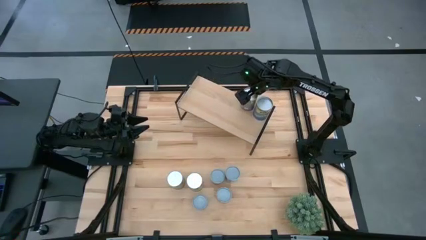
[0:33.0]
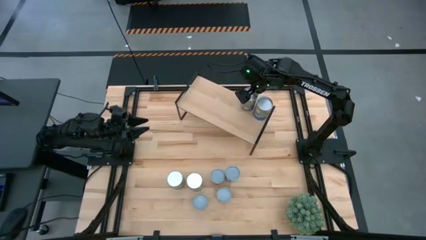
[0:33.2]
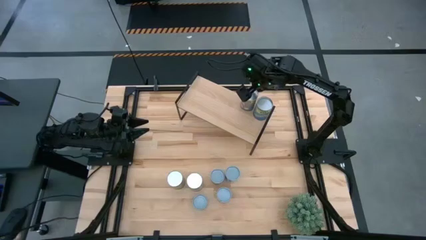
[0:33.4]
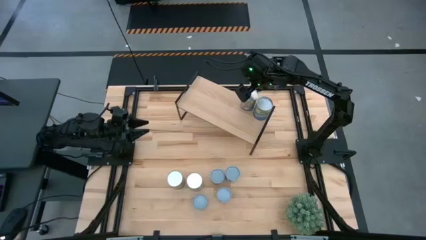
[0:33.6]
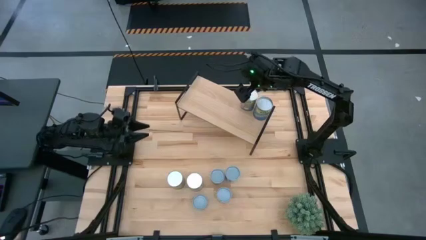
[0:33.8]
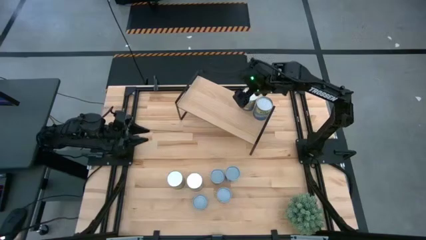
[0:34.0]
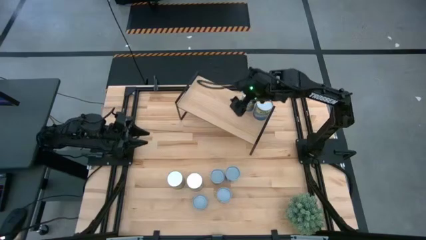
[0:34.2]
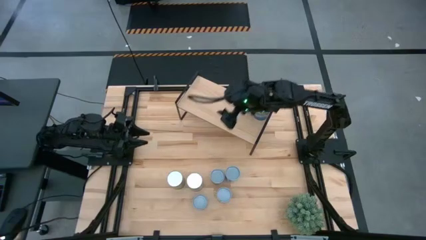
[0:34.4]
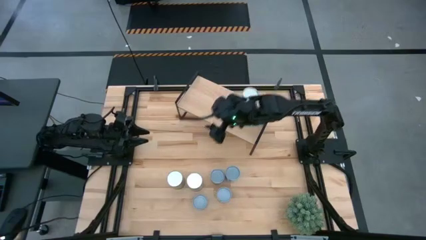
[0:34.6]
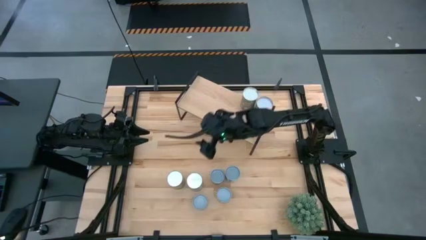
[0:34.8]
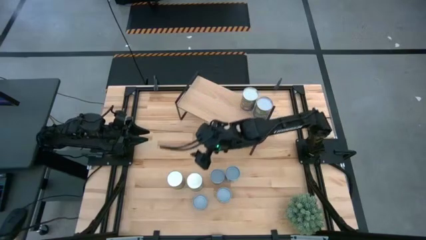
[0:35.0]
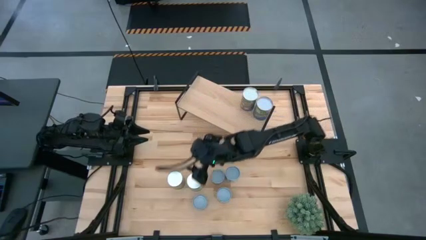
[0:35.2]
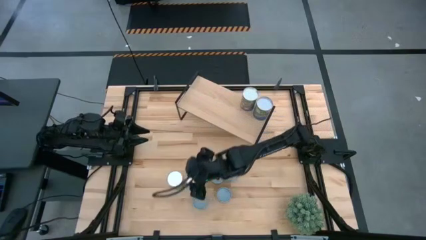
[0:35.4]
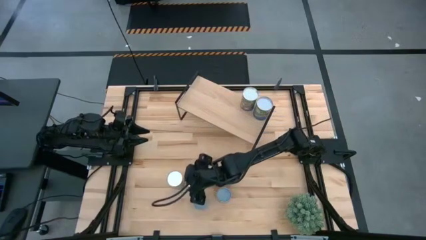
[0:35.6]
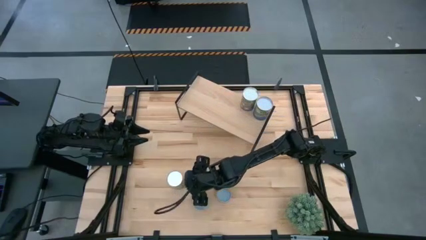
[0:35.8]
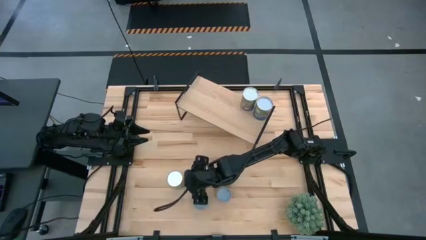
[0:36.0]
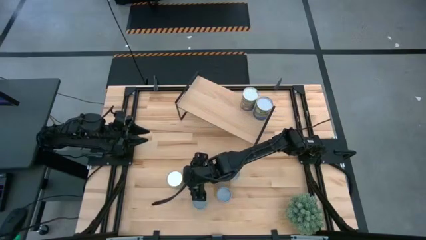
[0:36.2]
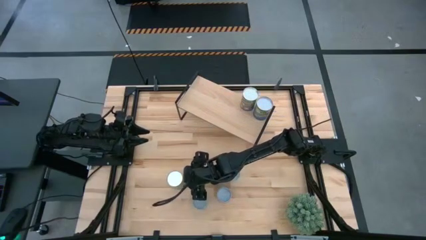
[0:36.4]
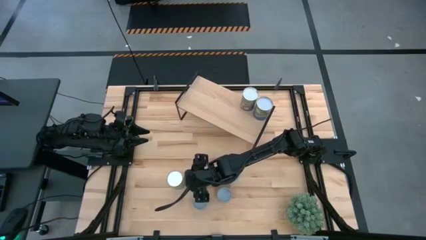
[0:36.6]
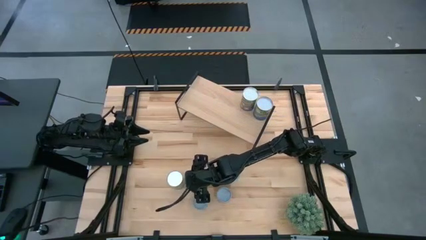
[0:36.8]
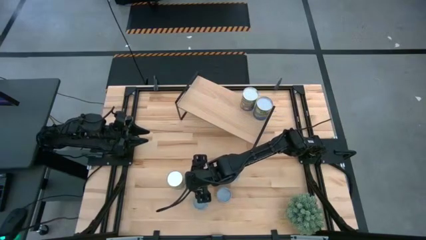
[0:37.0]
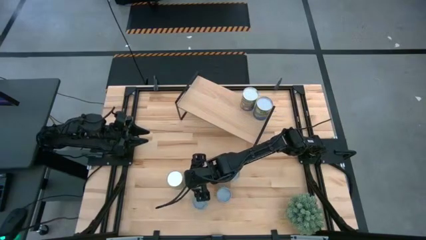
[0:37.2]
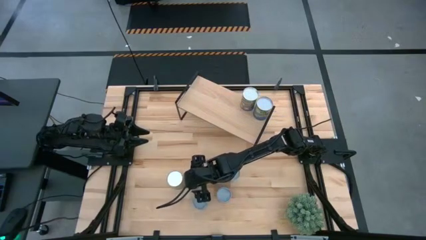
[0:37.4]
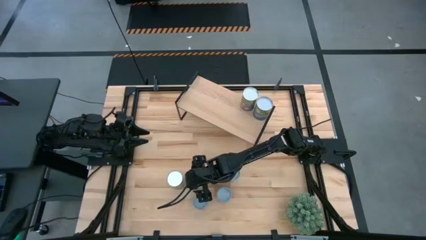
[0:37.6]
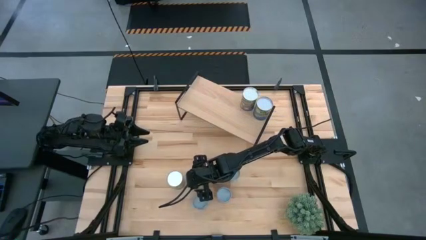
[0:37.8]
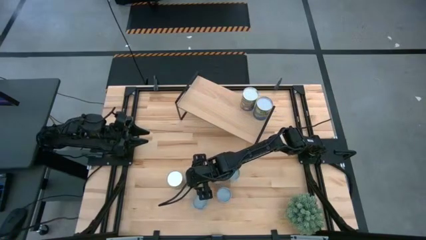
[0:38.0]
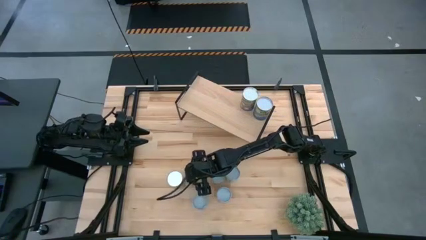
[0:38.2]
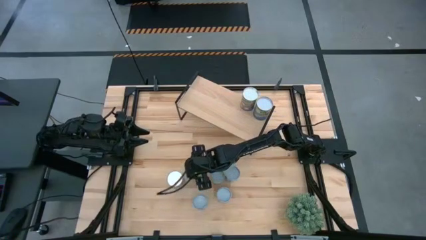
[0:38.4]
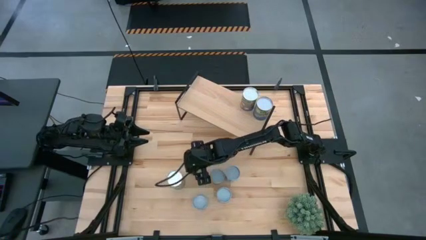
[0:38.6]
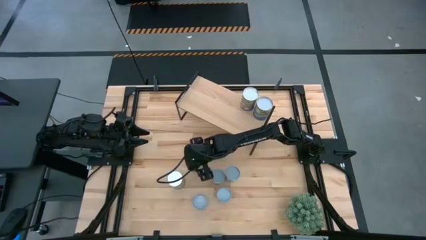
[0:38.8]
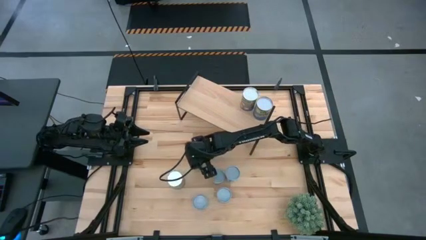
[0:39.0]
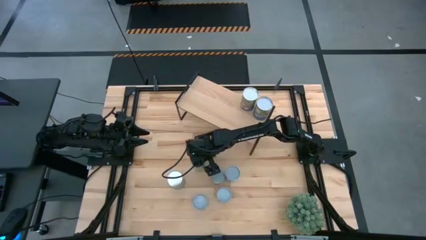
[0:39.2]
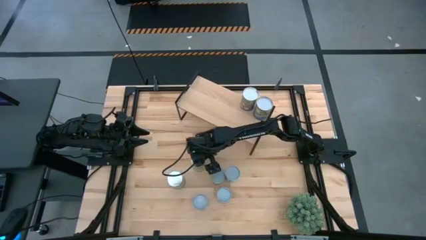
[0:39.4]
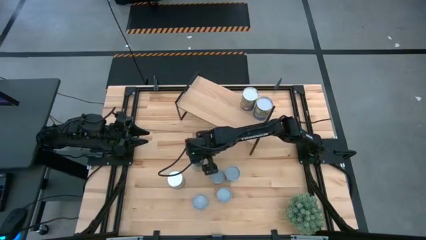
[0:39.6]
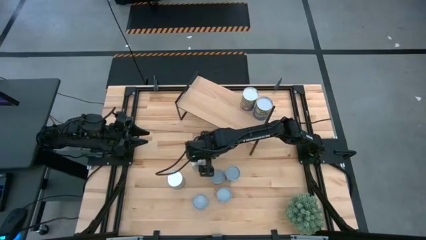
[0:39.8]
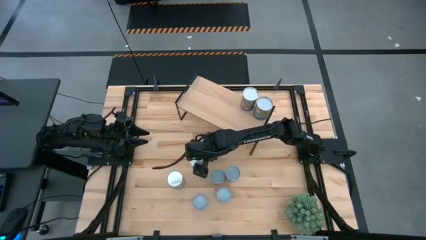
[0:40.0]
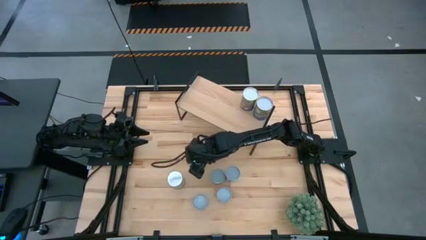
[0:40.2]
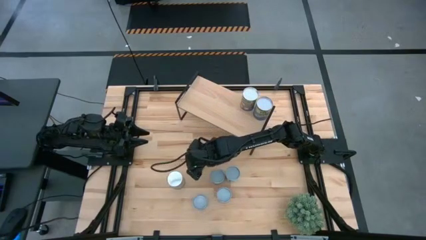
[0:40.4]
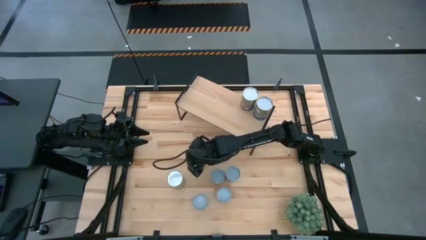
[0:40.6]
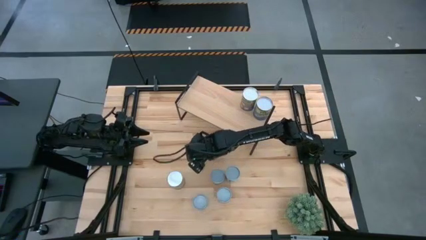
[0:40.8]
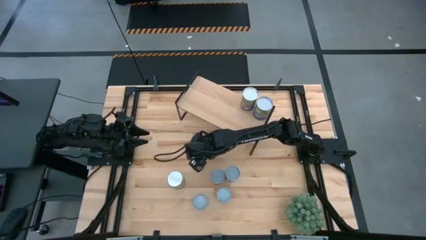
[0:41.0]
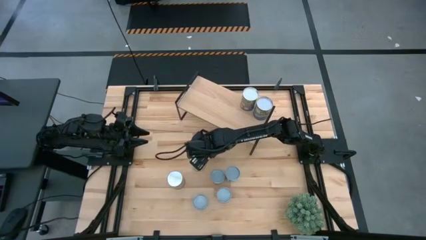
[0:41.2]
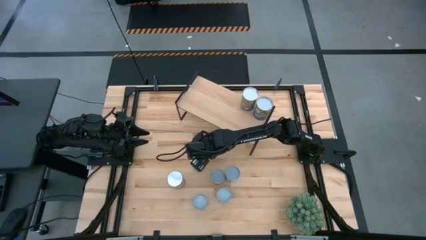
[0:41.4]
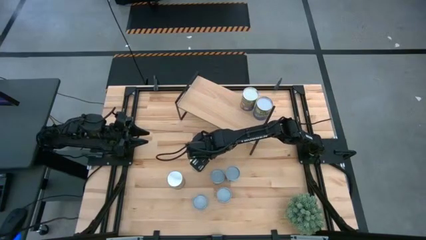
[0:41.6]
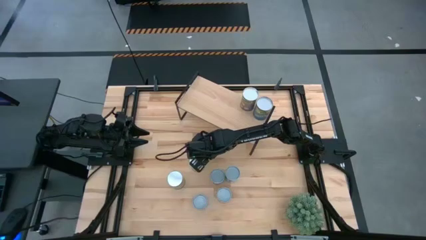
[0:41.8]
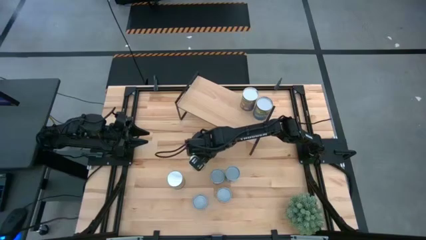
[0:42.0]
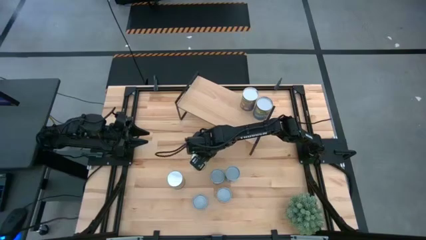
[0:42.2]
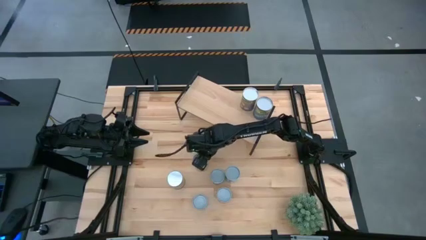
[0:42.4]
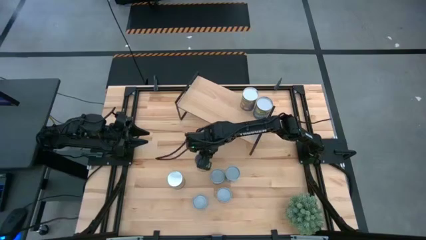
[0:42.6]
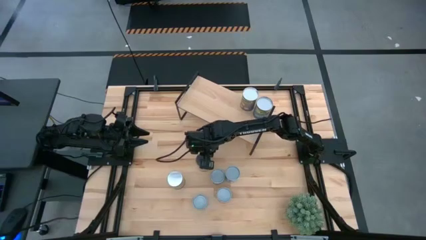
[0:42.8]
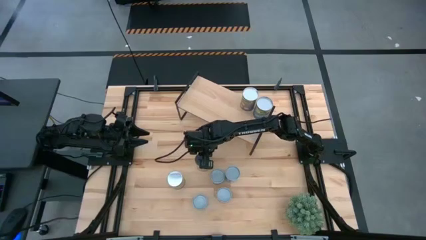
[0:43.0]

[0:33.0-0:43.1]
Task: Pick and place cans onto a shelf
Put the canned carrots on the shelf
